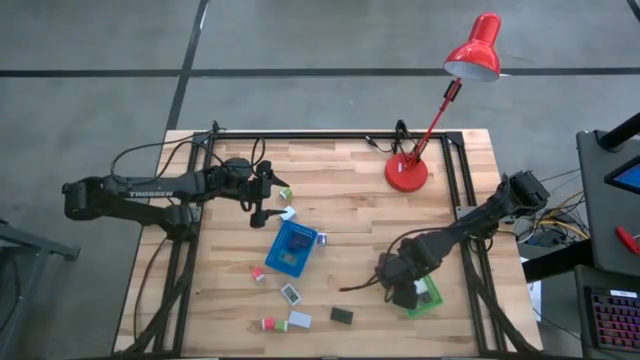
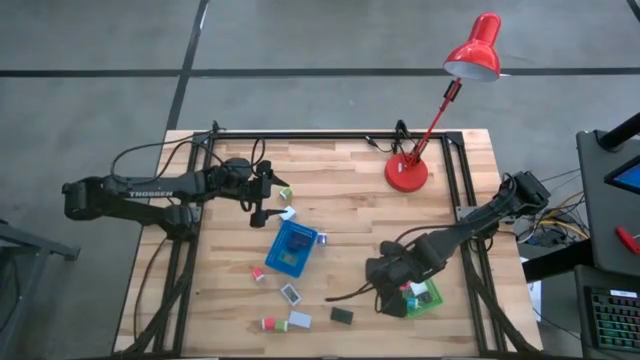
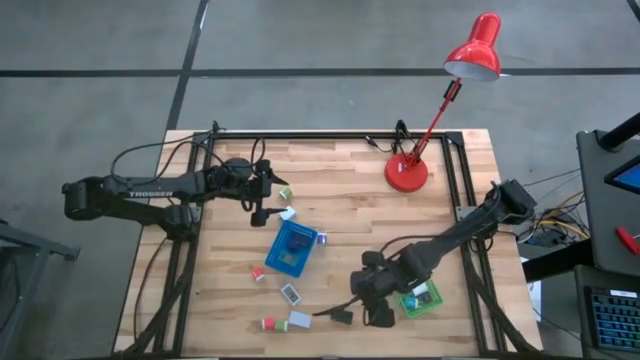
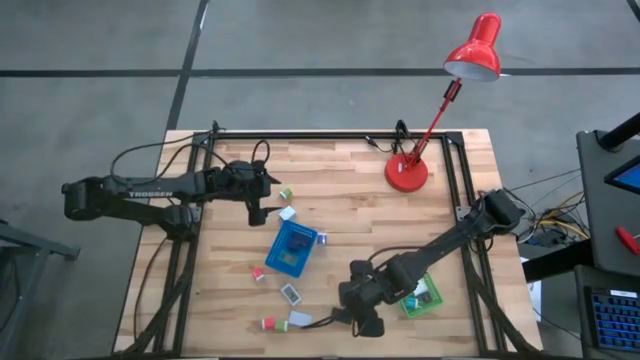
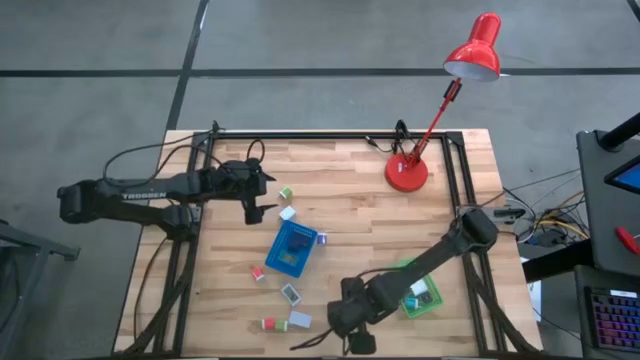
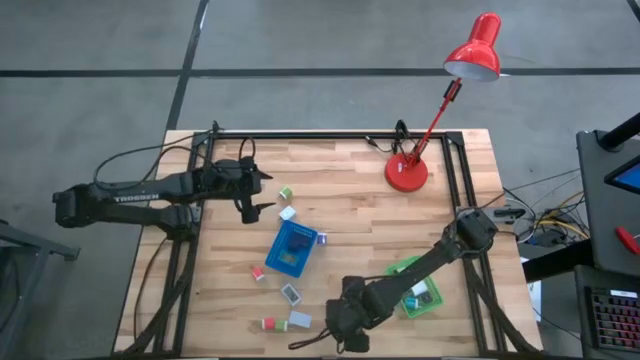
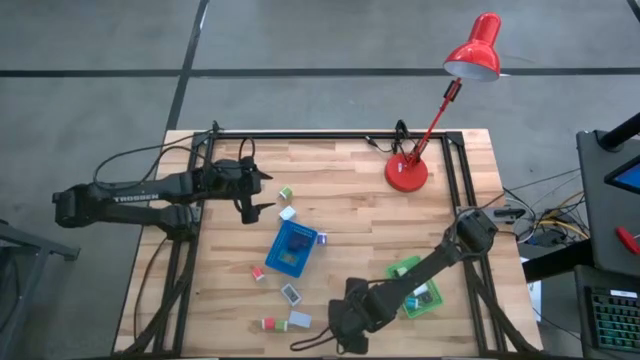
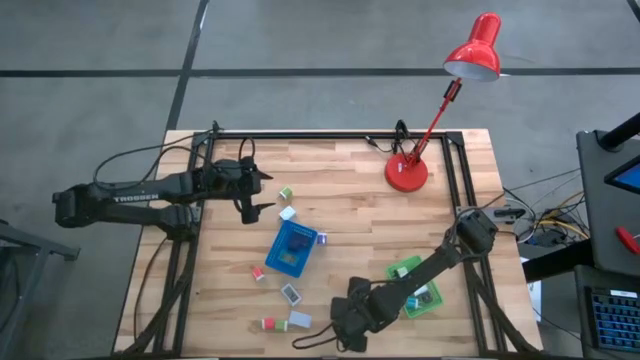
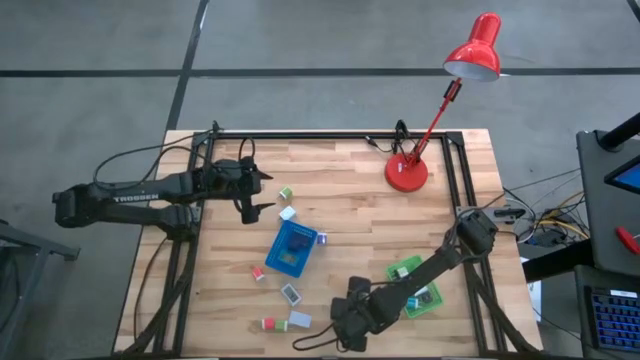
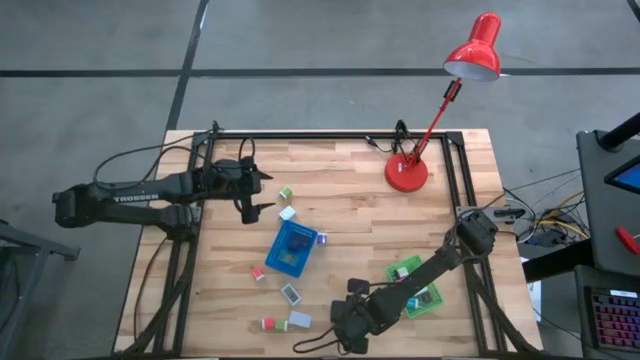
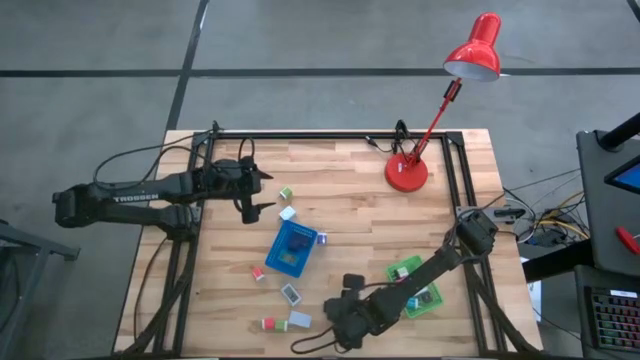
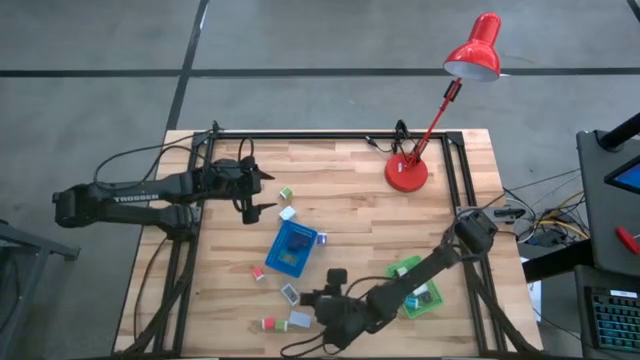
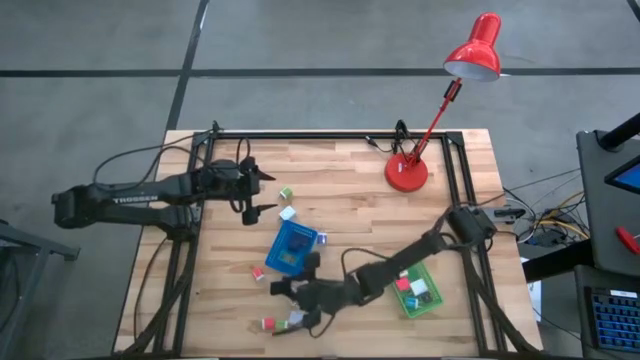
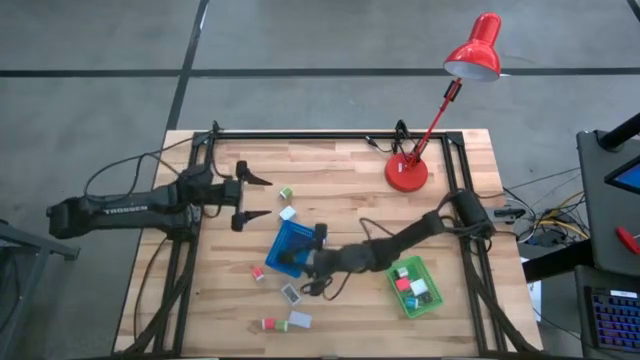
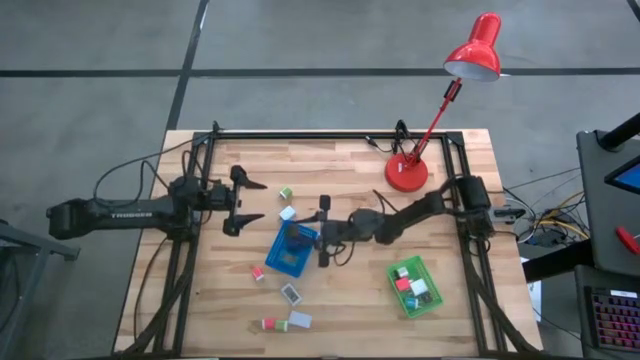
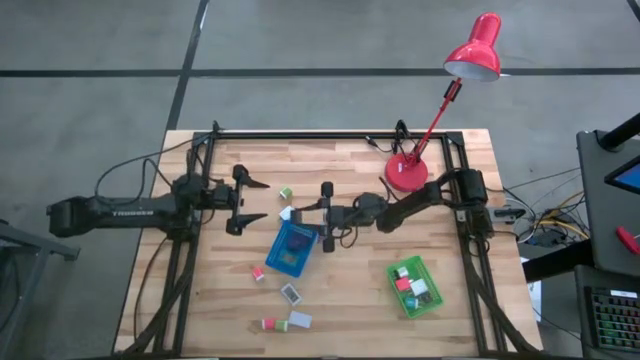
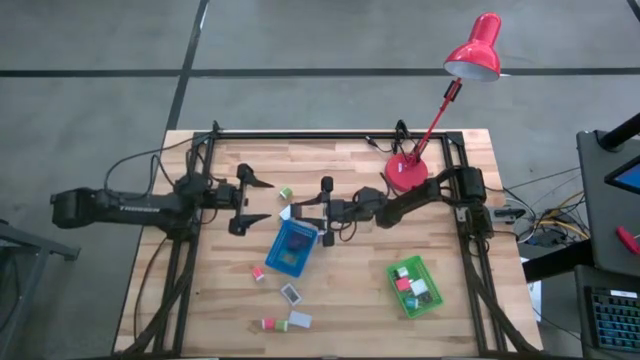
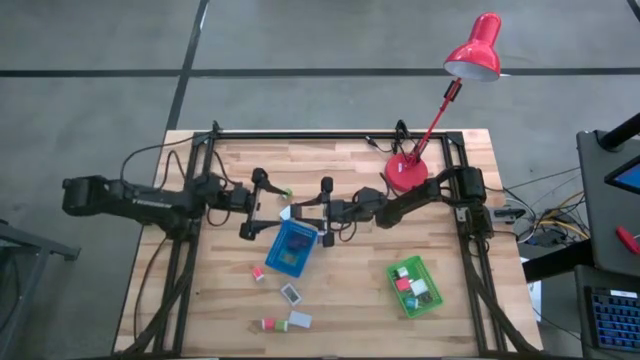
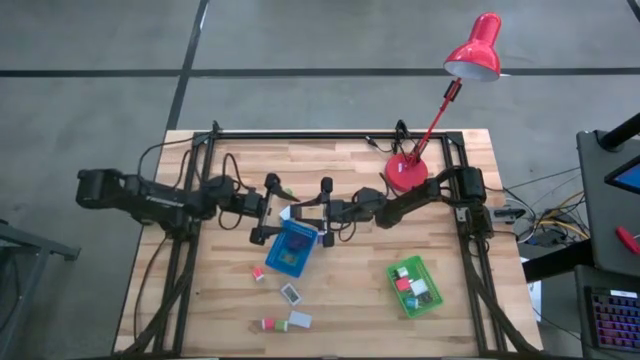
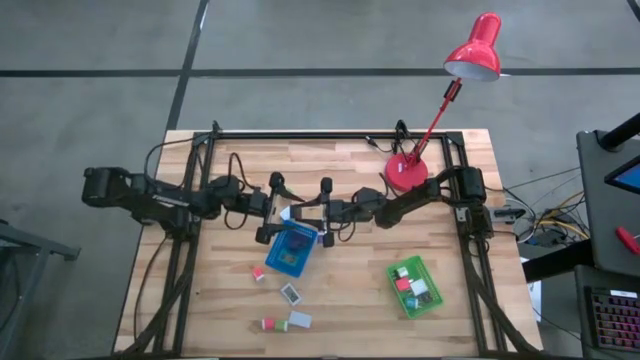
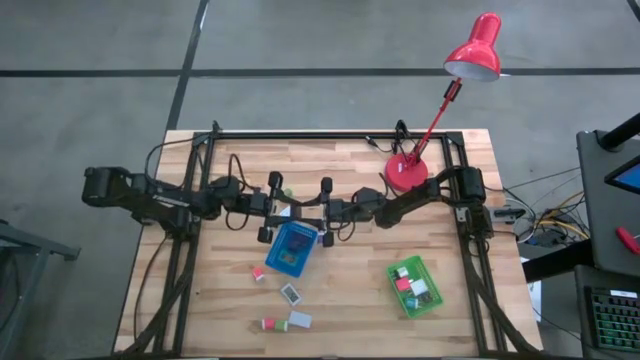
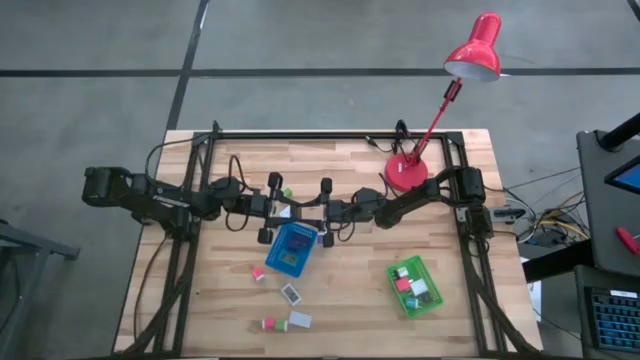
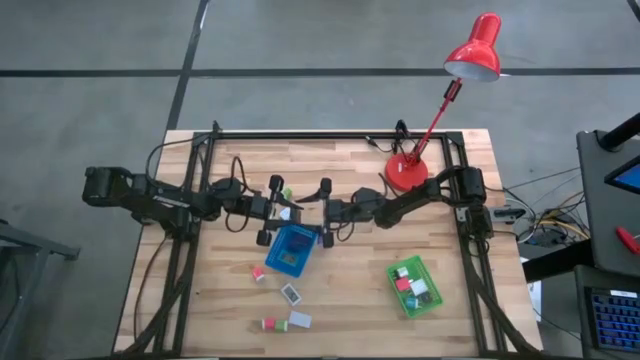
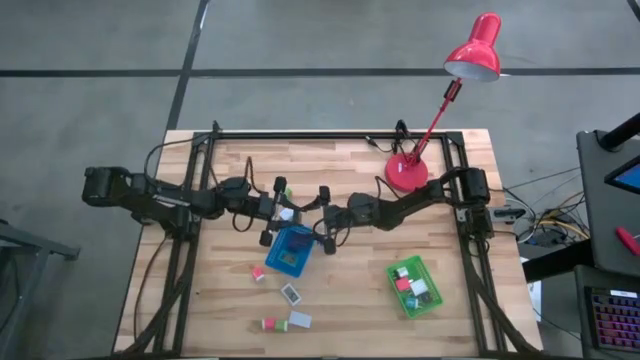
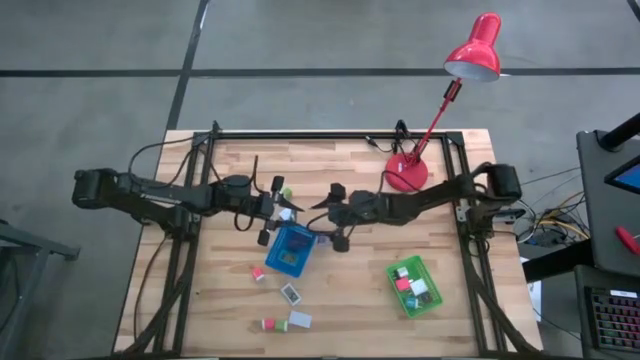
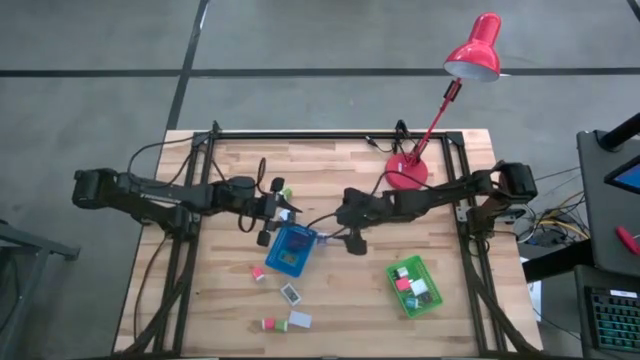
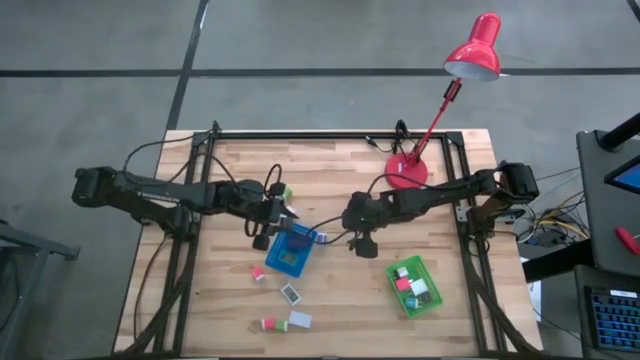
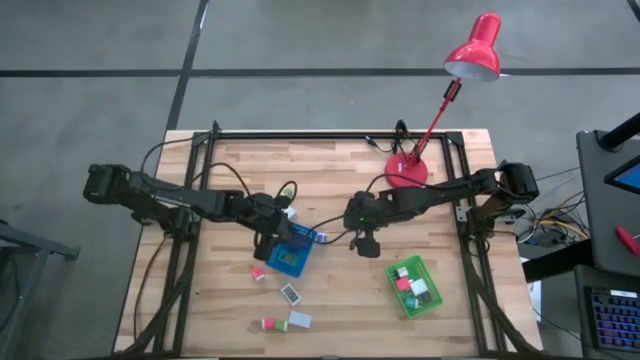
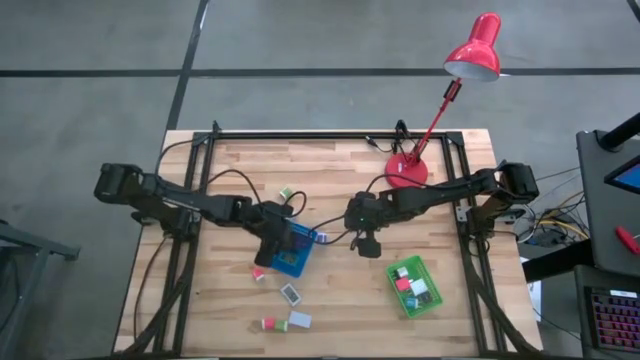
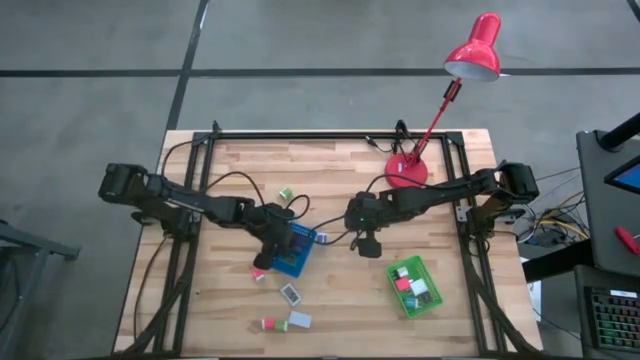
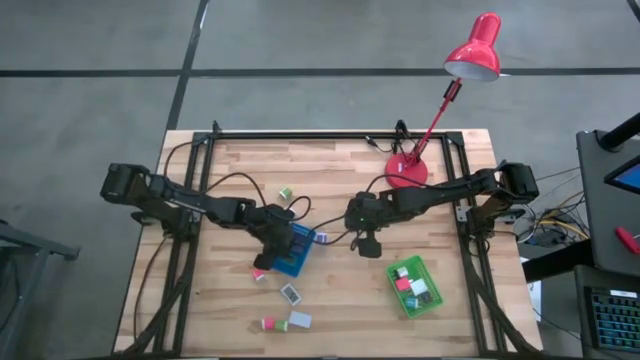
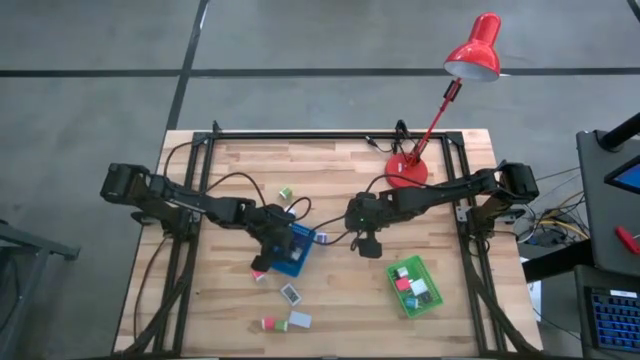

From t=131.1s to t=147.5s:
Task: Pick & Place Office items
Put the black digital clock into the blue bin
